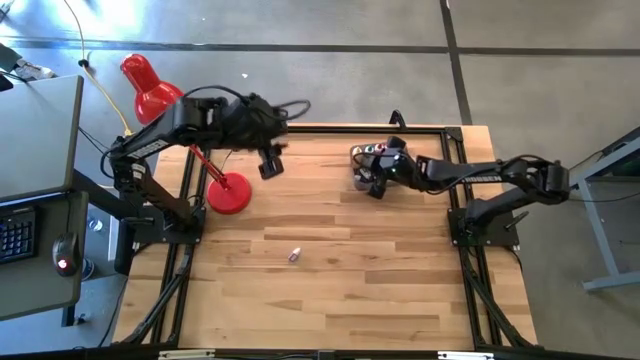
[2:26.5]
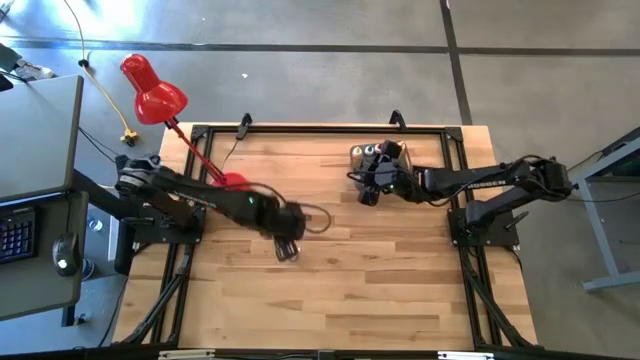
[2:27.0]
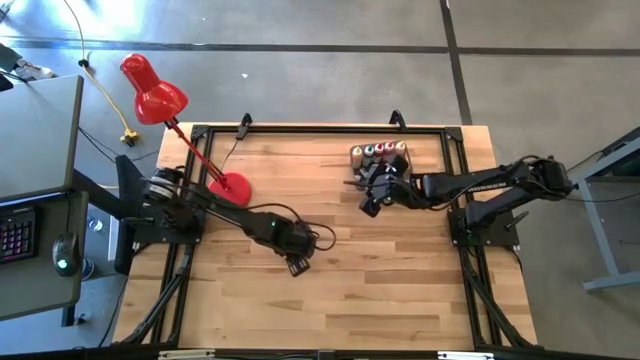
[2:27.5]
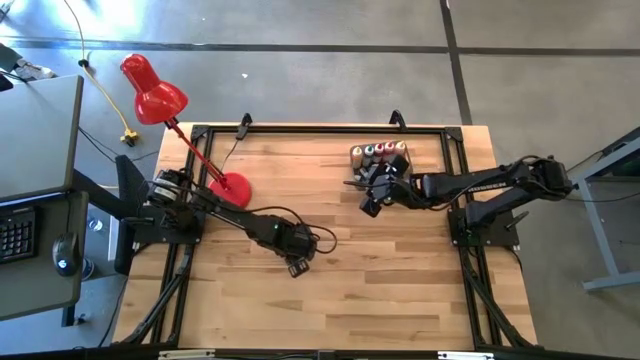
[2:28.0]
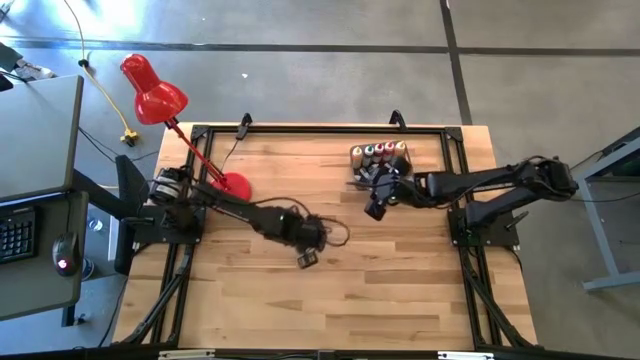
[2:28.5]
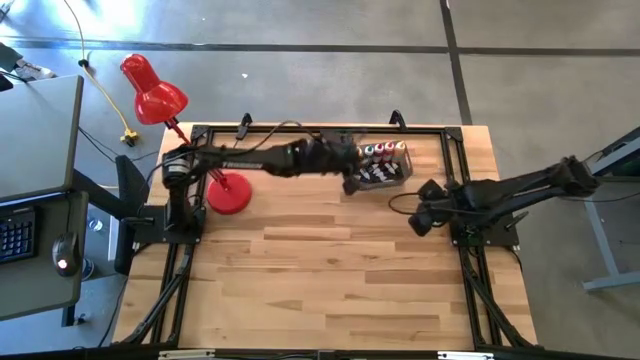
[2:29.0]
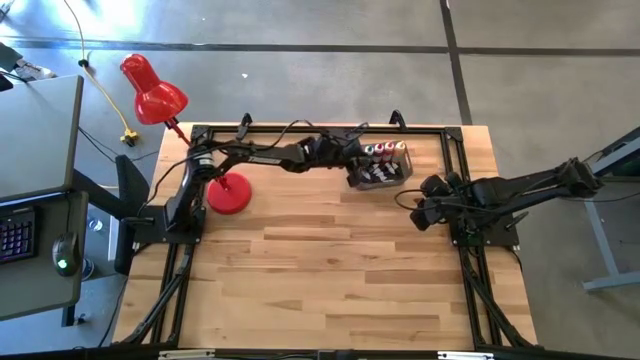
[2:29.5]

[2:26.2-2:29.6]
Task: Pick & Place food coloring
Put the small purple food coloring bottle into the bin

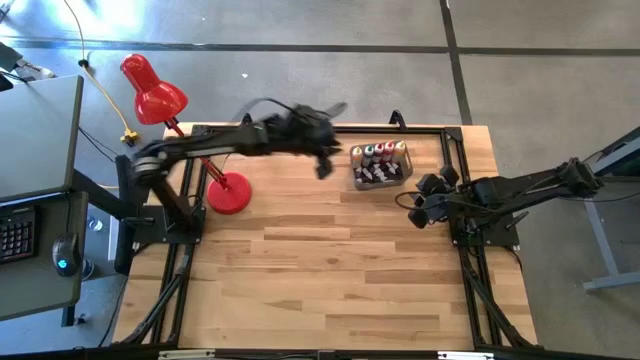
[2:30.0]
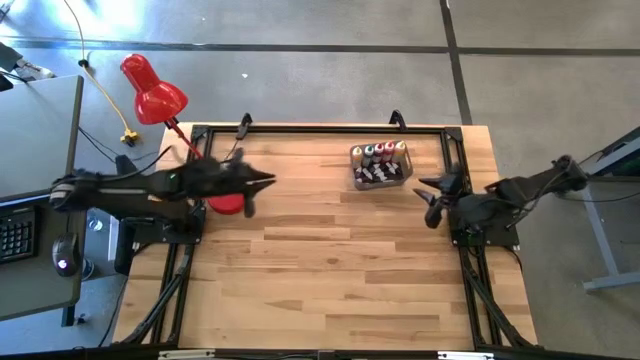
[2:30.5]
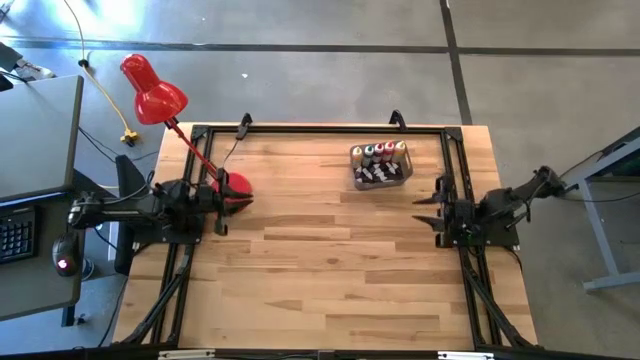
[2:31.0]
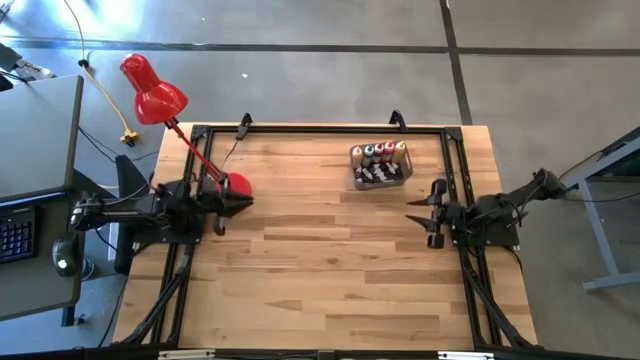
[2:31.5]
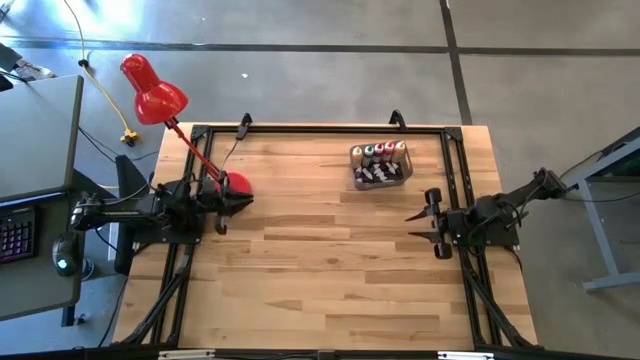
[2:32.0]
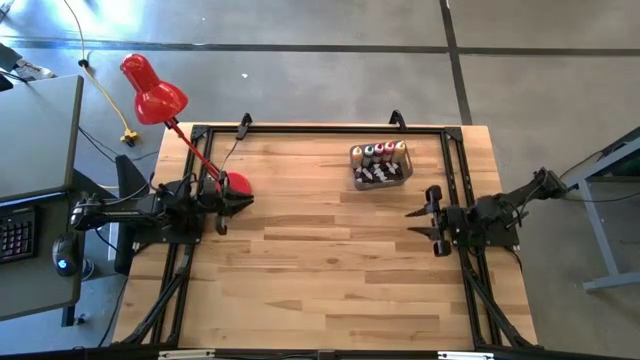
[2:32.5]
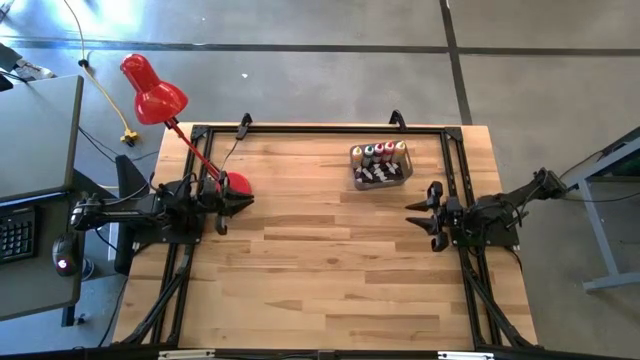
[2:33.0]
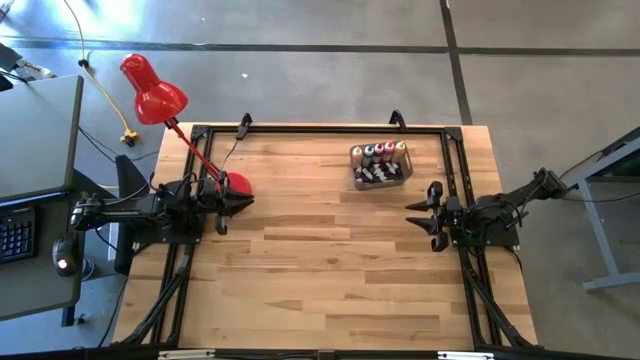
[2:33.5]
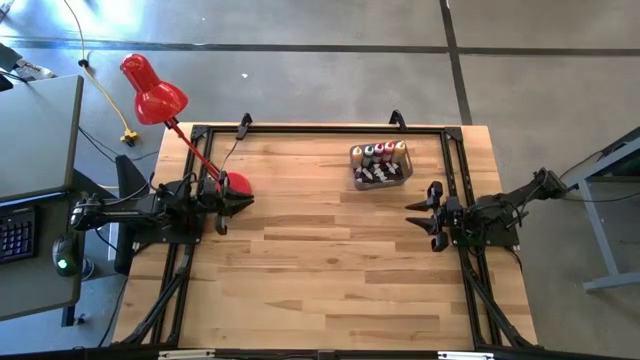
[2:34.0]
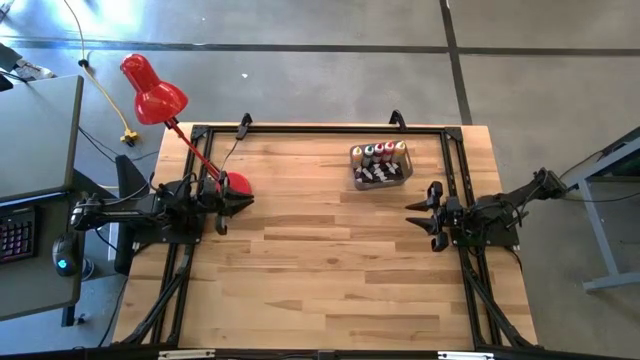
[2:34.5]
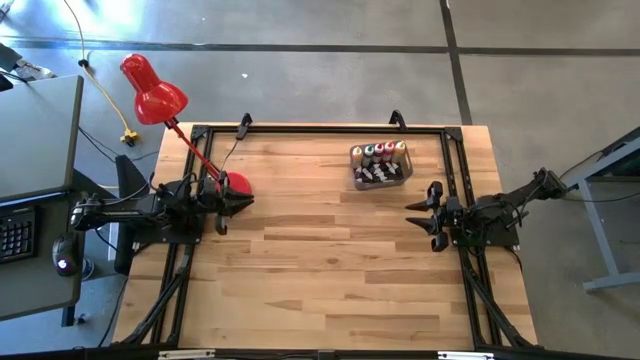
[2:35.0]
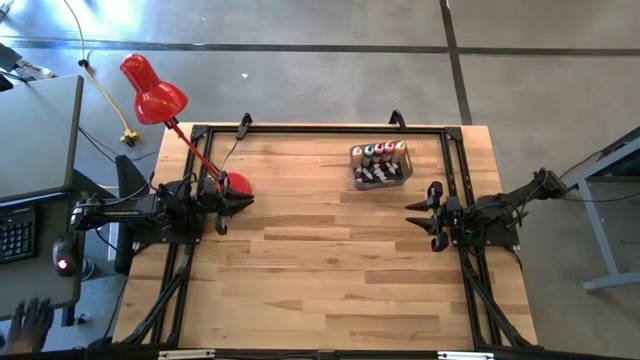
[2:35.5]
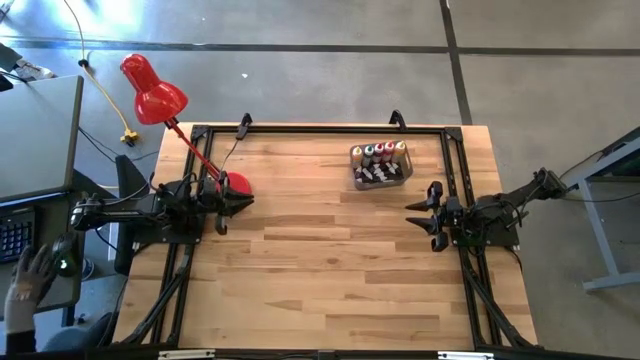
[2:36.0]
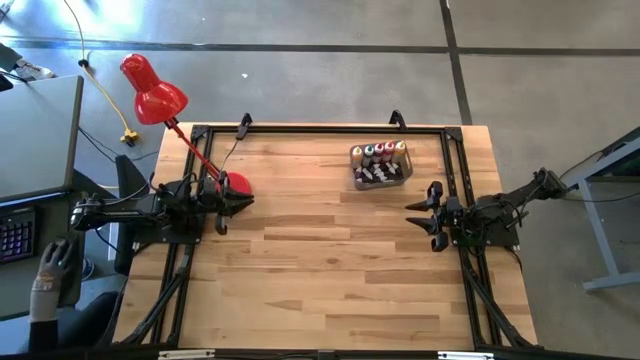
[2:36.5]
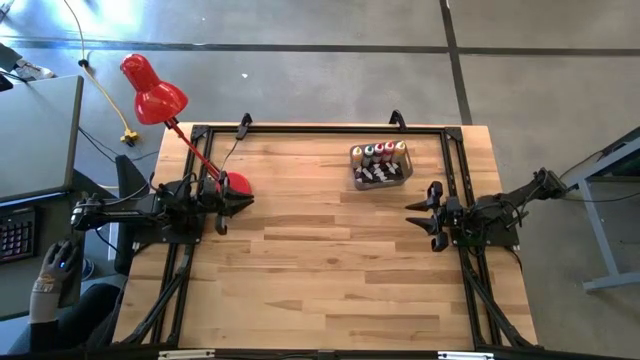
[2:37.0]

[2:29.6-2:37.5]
Return to Home Position

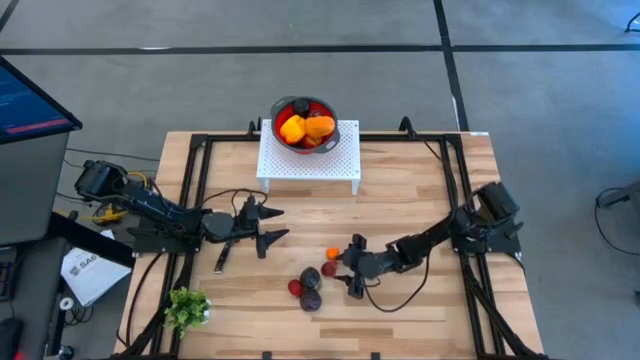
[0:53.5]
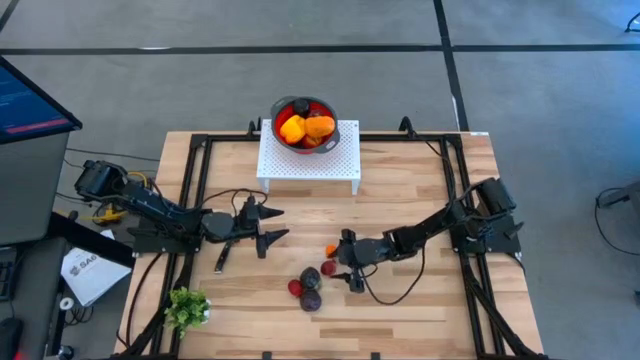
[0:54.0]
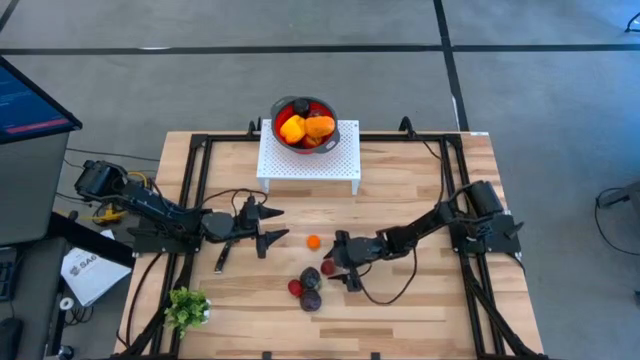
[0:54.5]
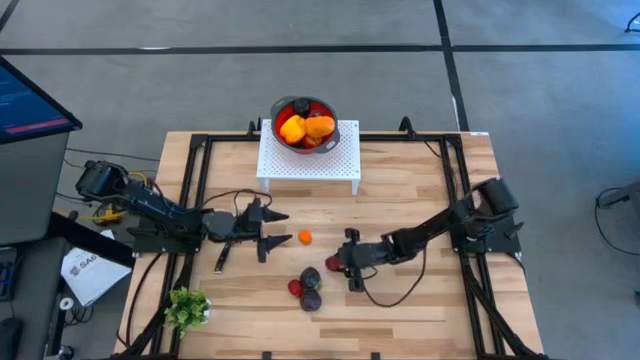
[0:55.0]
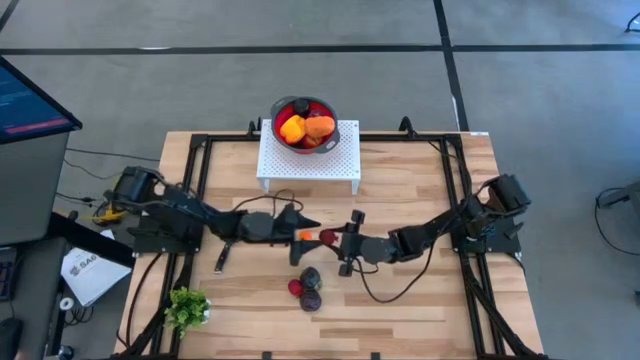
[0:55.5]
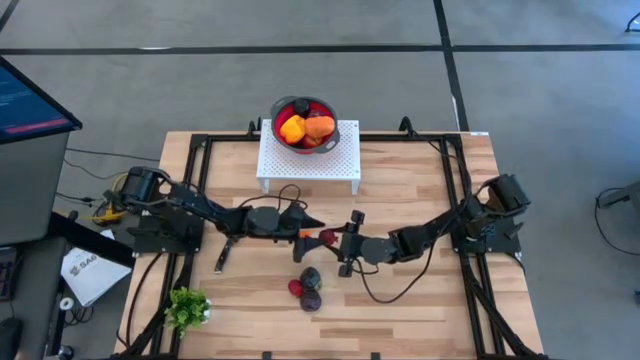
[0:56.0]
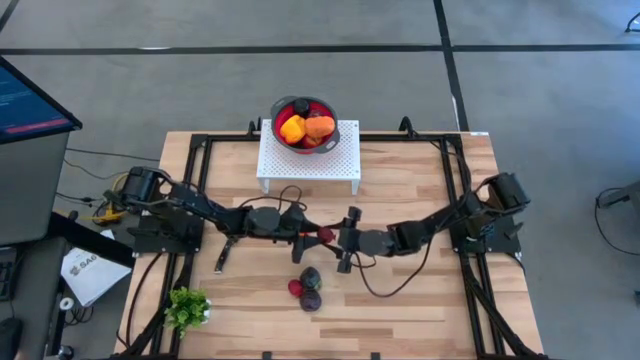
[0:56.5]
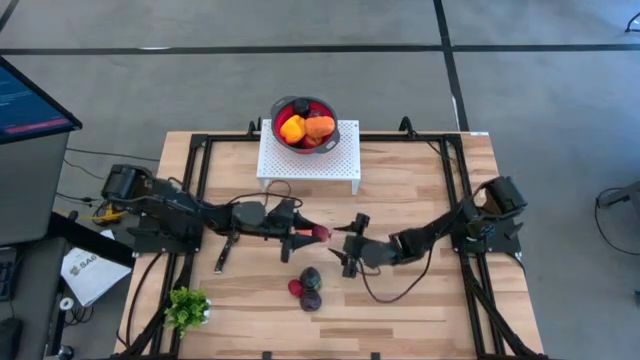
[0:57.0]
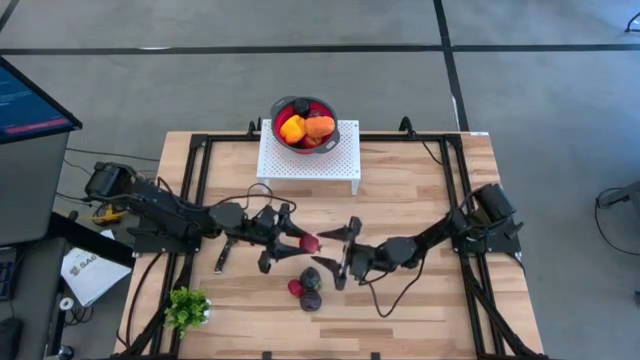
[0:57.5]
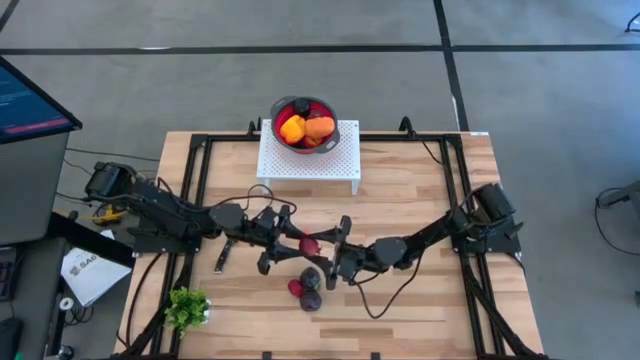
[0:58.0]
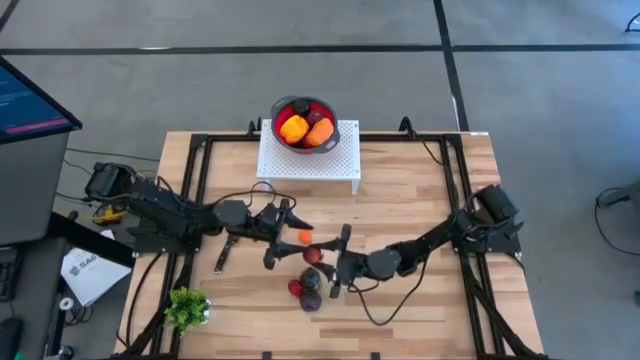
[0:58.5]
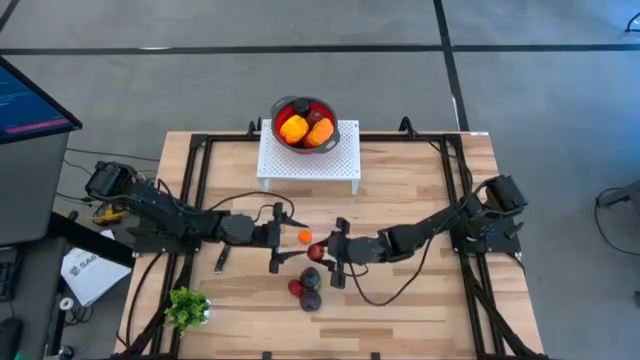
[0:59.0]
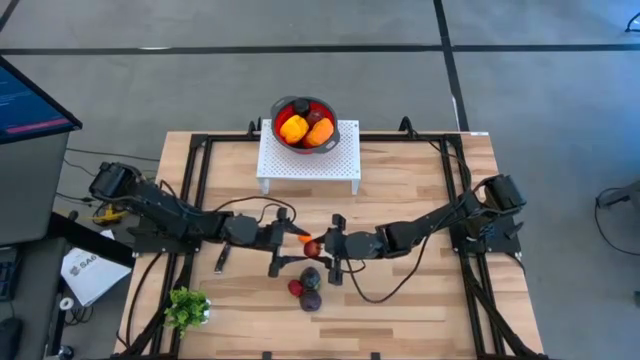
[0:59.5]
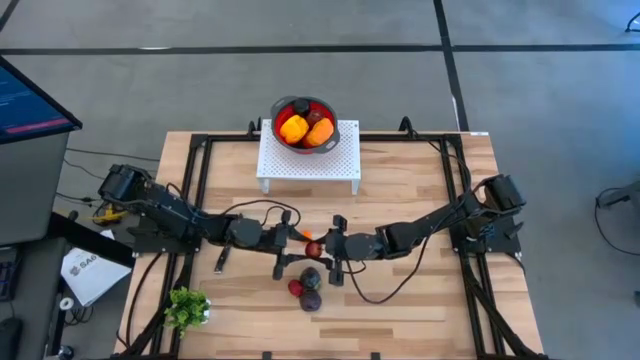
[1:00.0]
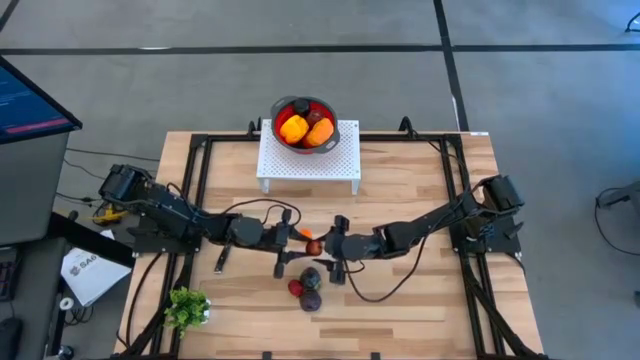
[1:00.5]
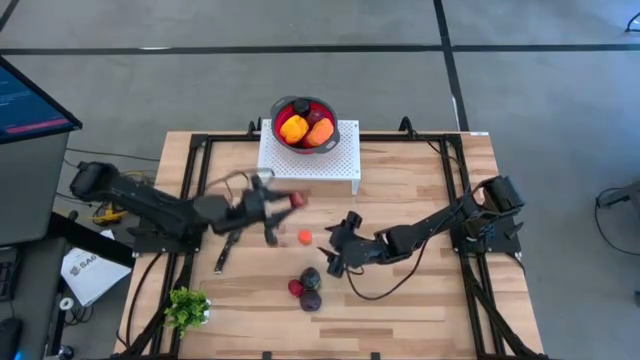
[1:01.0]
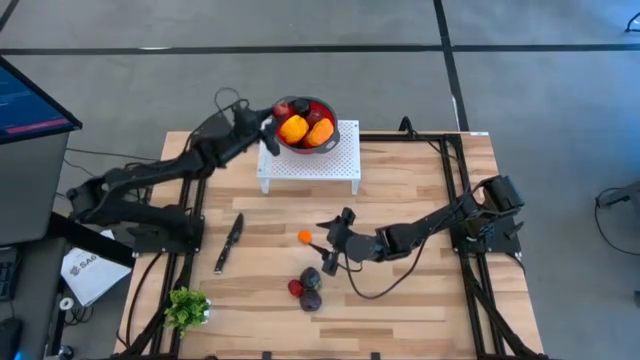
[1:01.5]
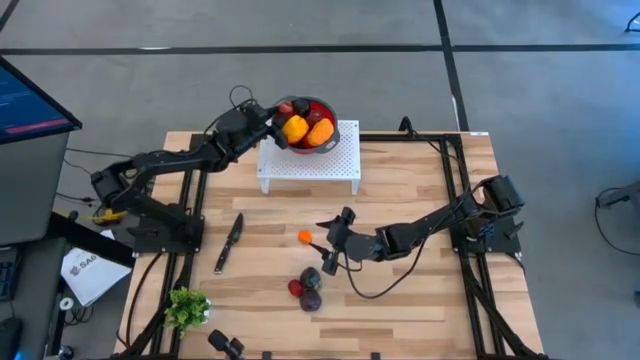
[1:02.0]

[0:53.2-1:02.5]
Task: Pick & Place Fruit
Put the right pomegranate into the red strainer bowl on the shelf

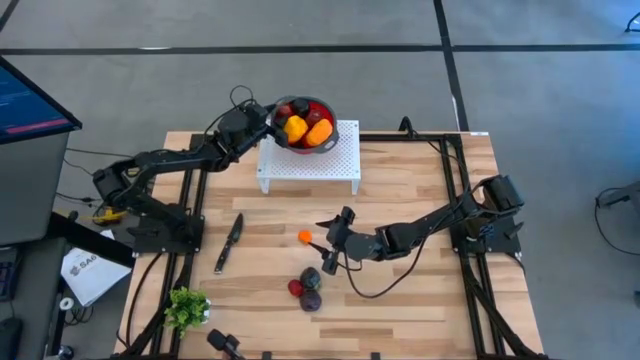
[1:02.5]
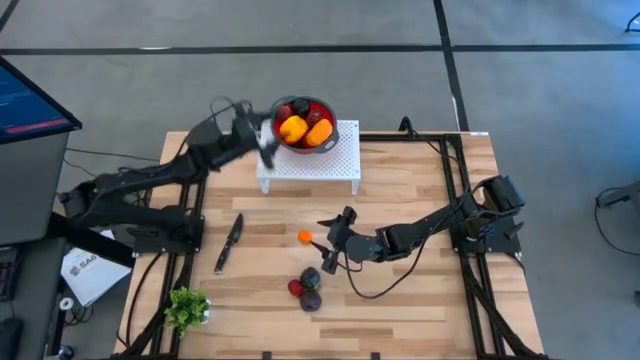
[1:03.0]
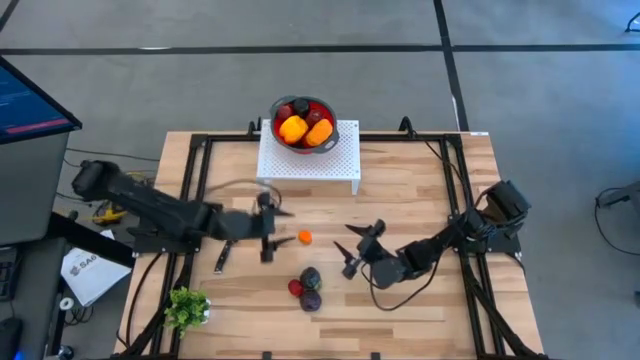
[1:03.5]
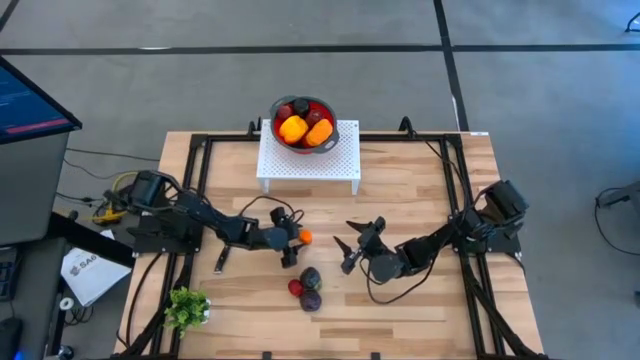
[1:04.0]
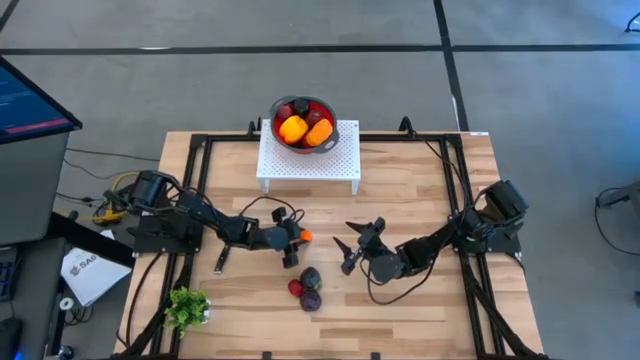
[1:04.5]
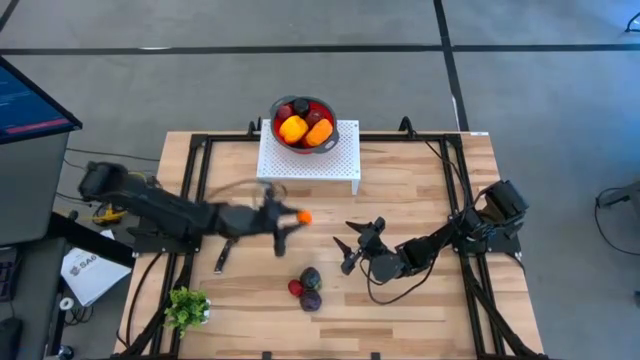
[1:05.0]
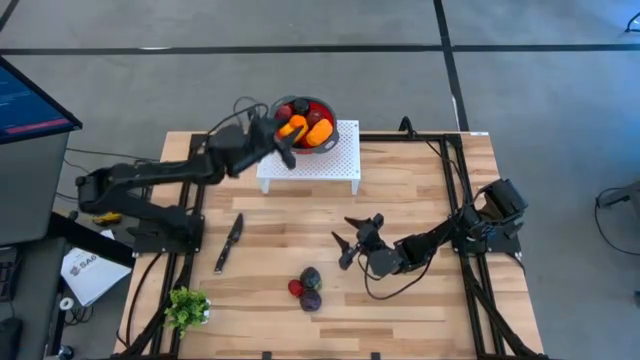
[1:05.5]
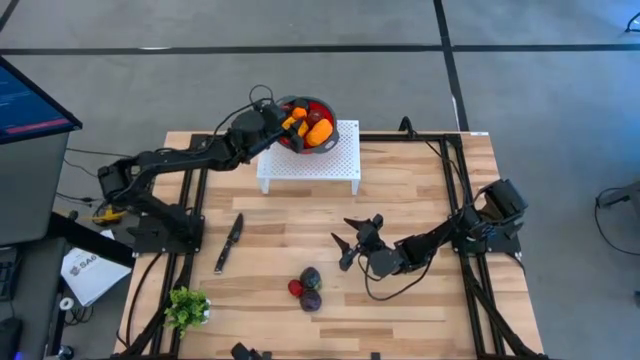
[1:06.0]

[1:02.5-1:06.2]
Put the orange into the red strainer bowl on the shelf
